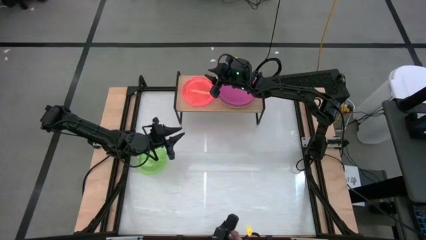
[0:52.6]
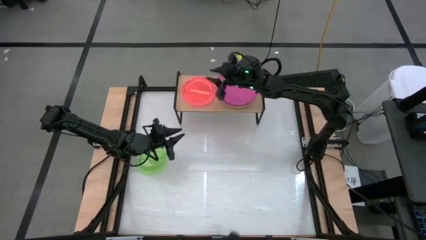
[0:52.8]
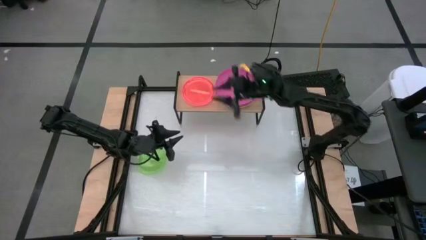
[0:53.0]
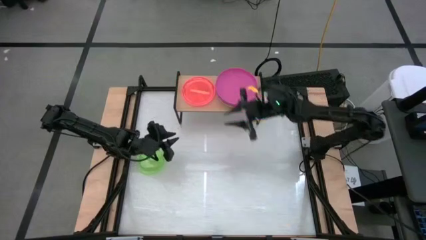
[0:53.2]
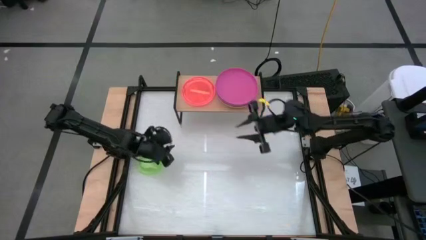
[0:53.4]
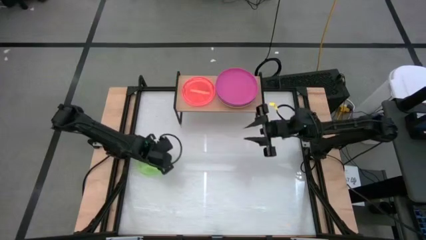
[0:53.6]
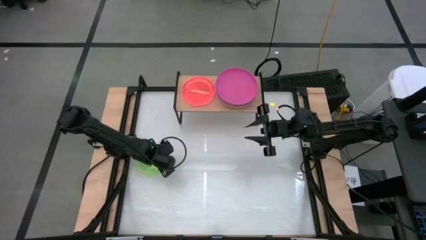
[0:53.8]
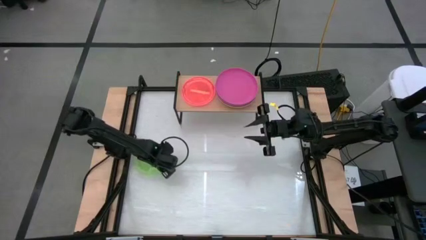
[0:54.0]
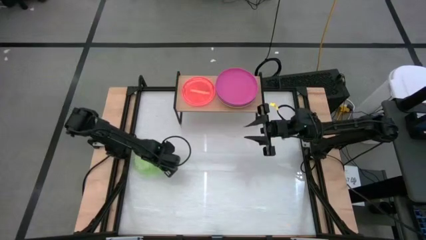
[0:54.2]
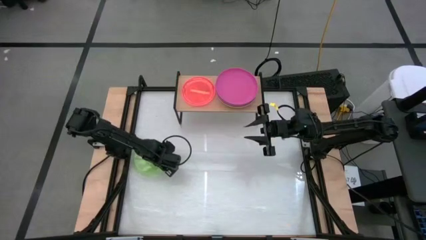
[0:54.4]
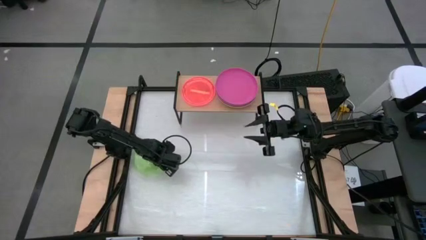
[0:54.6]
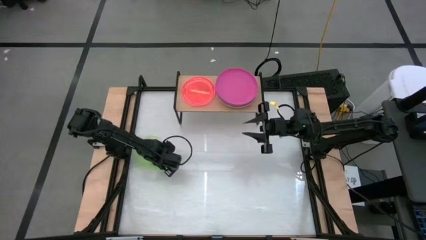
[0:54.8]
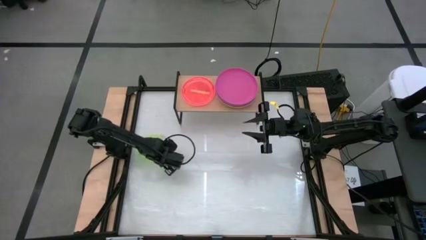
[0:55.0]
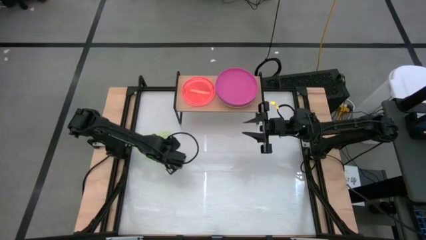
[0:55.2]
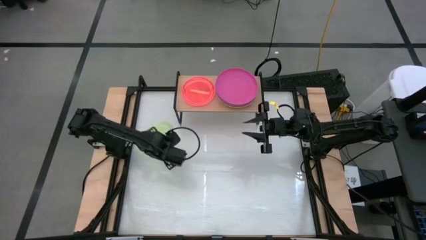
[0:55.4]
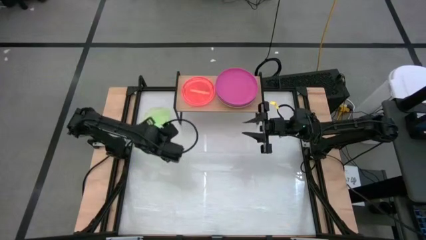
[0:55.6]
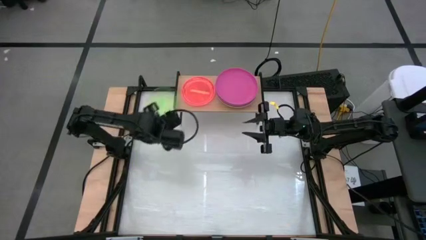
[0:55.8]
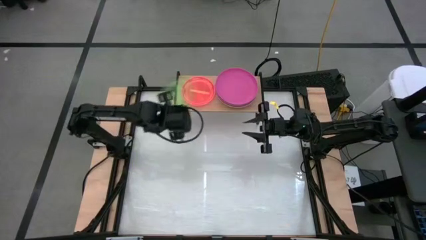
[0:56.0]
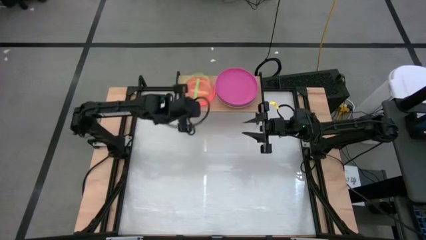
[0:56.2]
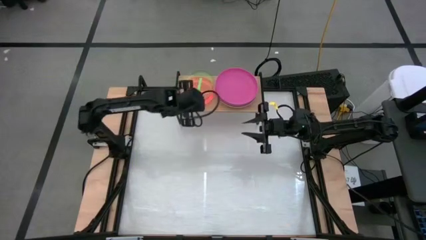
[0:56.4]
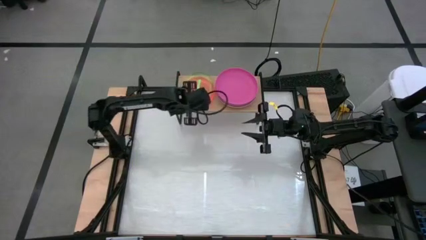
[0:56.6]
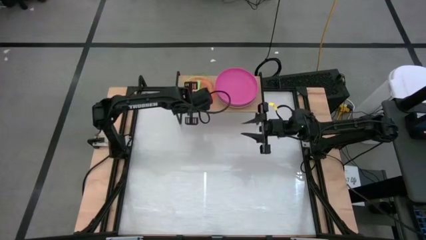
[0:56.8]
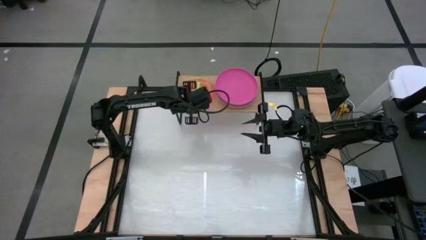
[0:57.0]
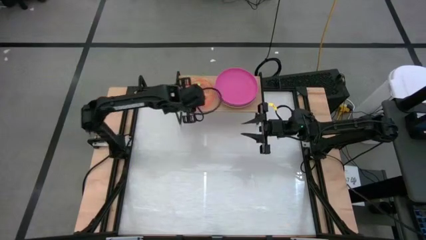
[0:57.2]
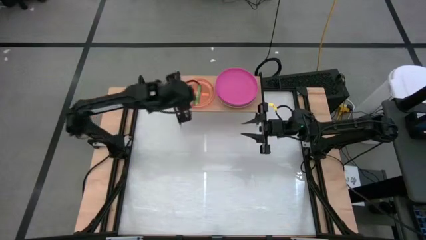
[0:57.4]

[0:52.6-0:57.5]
Task: Place and stack plates onto a shelf
Stack the green transparent plate on top of the orange transparent plate on the shelf

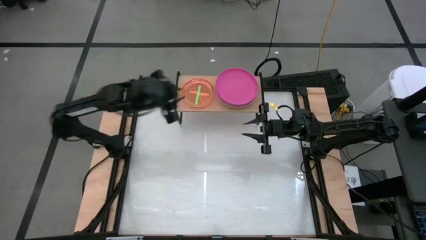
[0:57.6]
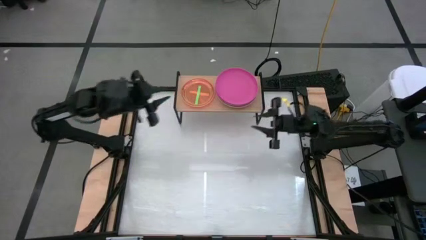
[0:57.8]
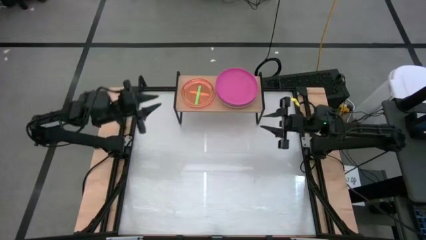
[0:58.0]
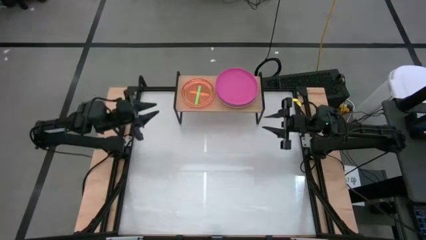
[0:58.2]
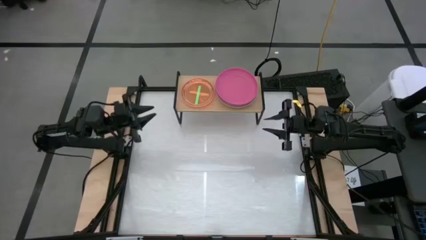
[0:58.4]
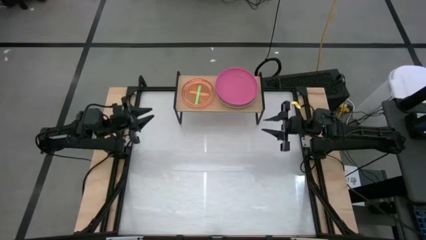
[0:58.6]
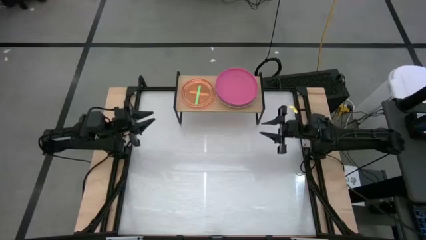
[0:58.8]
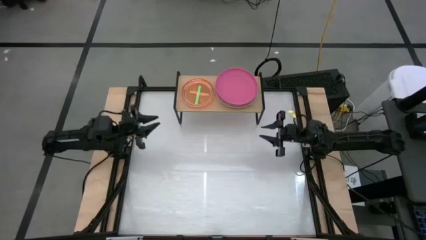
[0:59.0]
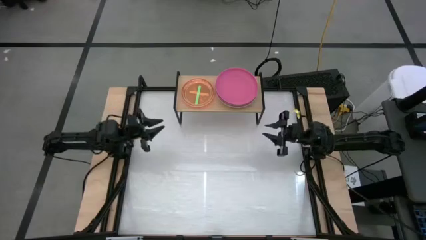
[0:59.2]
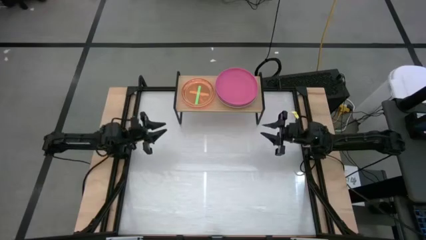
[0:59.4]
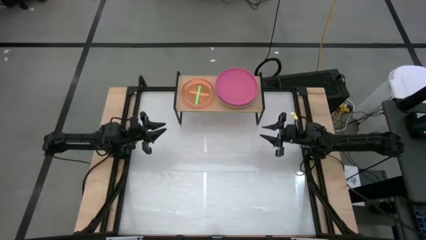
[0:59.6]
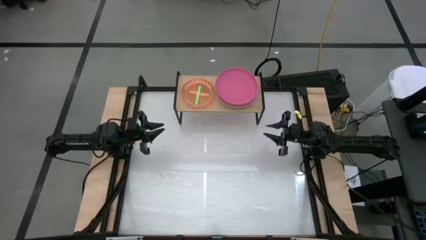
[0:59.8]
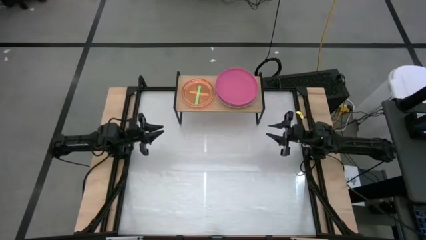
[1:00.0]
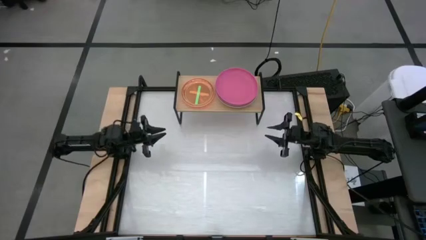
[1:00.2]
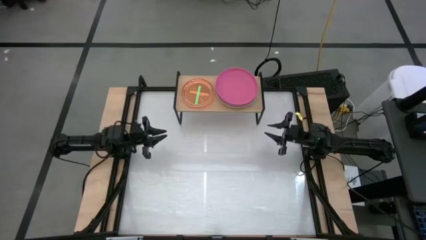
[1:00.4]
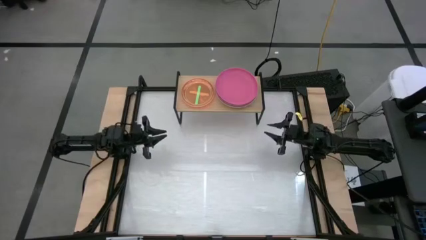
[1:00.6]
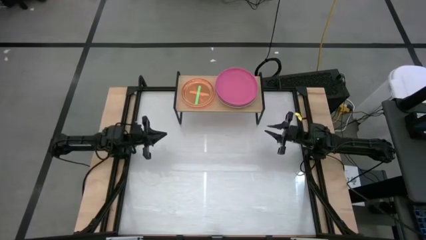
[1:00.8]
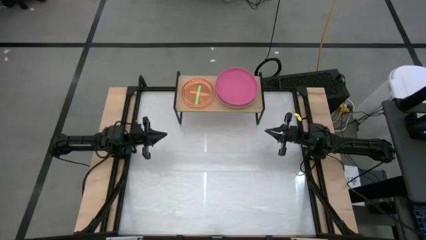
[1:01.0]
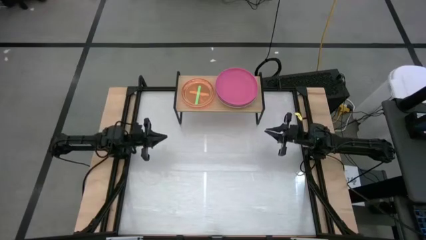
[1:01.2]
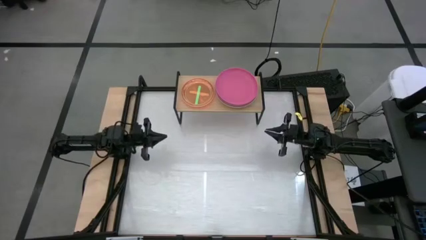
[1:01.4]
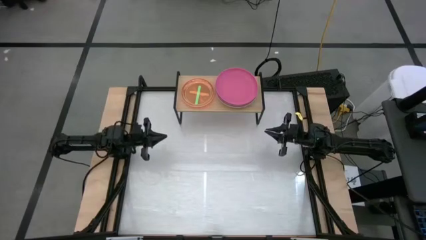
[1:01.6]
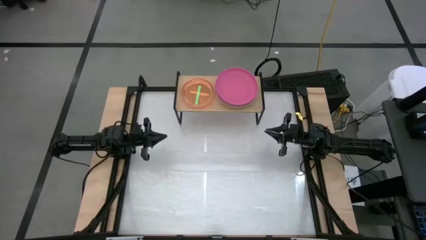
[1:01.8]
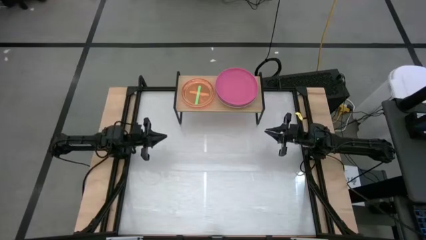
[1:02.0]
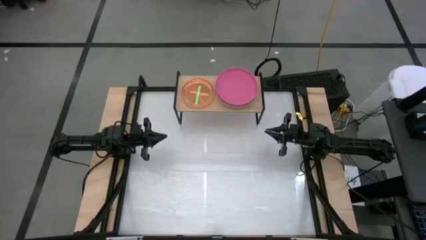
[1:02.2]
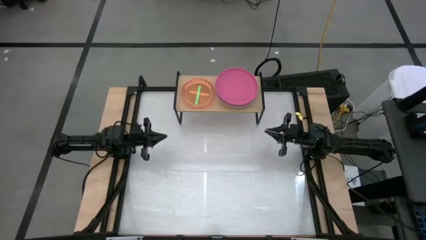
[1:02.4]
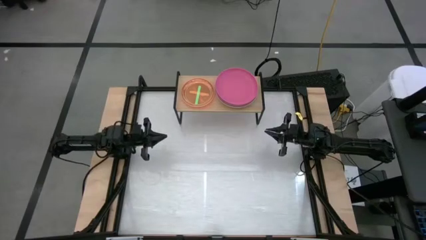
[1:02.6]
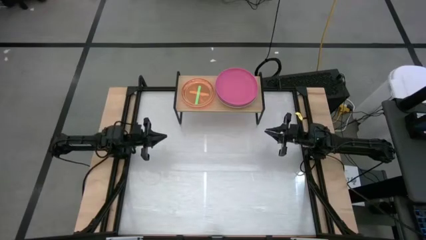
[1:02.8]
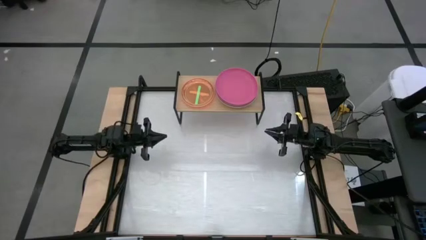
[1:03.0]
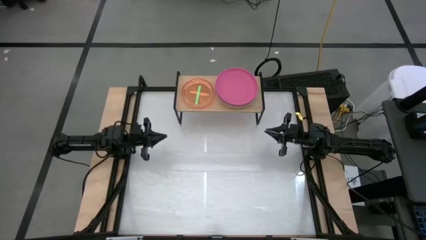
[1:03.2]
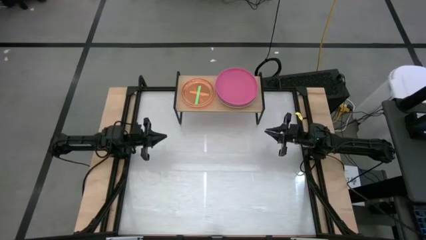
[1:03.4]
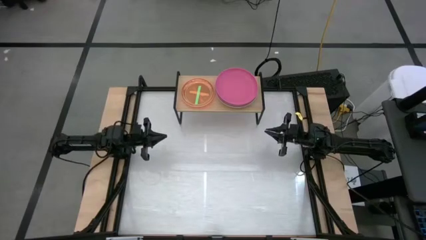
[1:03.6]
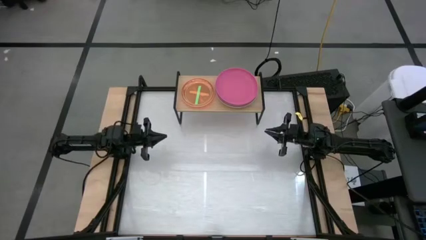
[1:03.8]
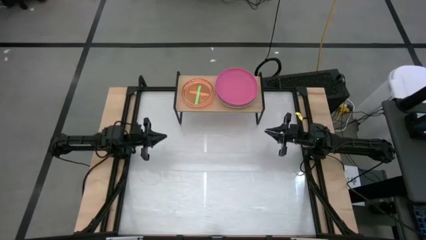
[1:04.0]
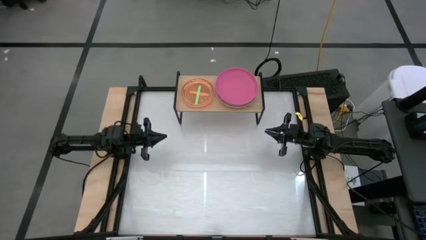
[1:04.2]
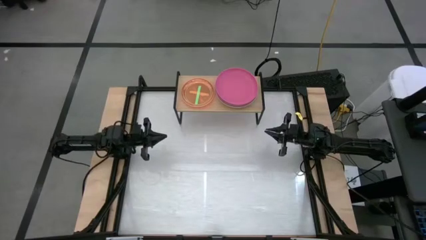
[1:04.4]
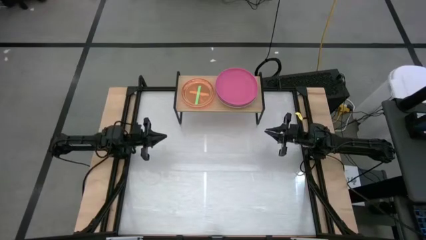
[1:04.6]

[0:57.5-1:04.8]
Return to Home Position

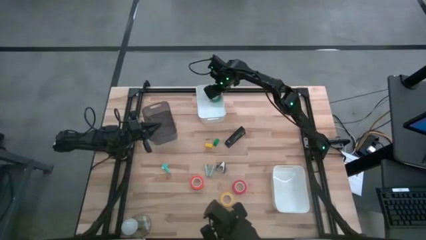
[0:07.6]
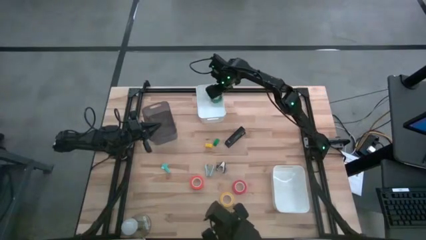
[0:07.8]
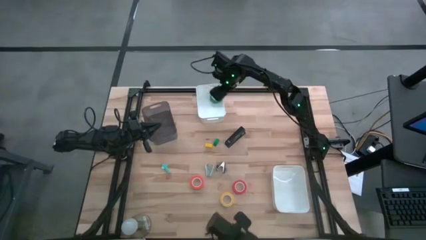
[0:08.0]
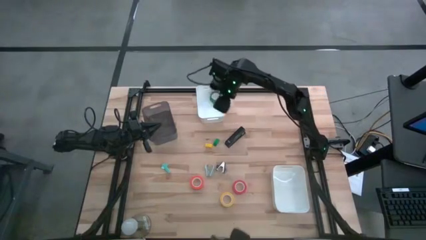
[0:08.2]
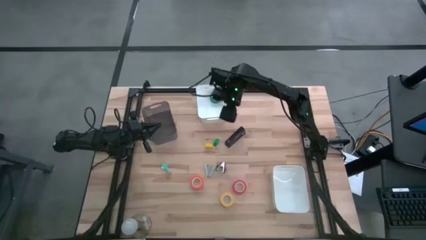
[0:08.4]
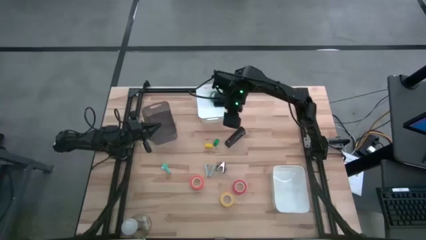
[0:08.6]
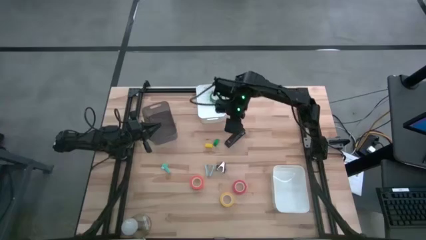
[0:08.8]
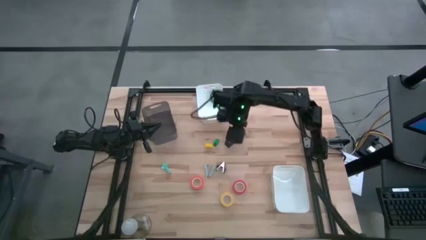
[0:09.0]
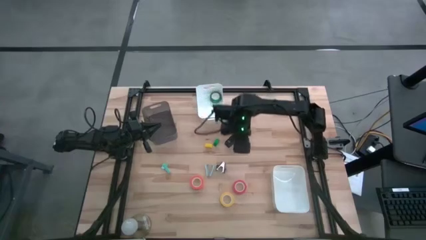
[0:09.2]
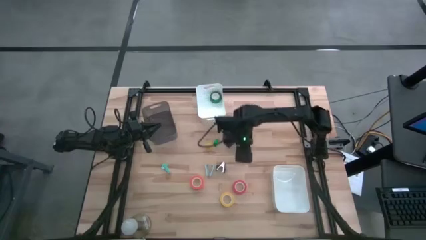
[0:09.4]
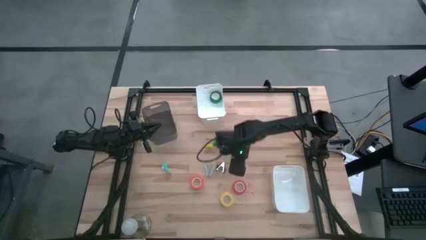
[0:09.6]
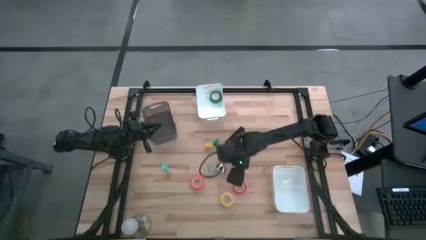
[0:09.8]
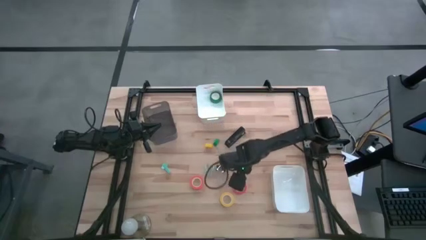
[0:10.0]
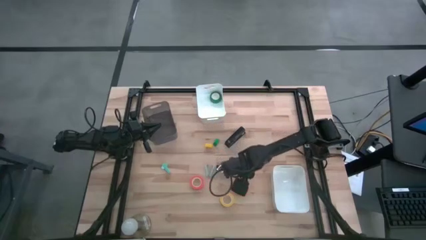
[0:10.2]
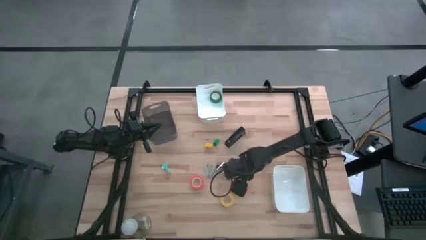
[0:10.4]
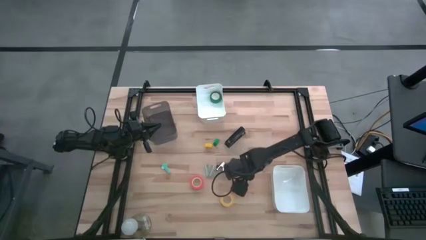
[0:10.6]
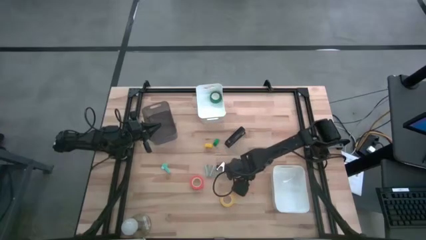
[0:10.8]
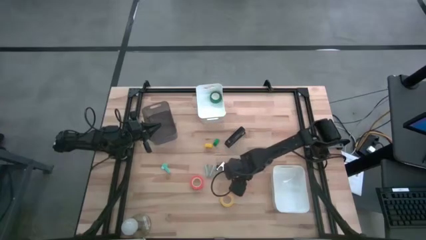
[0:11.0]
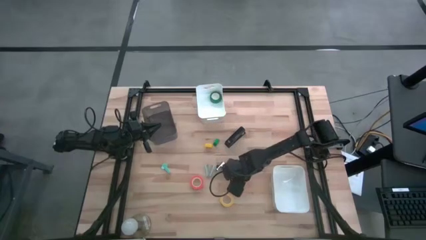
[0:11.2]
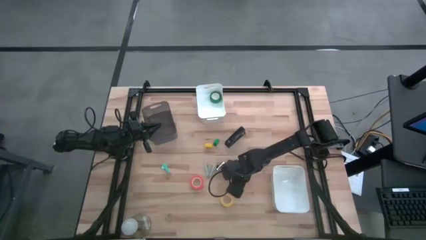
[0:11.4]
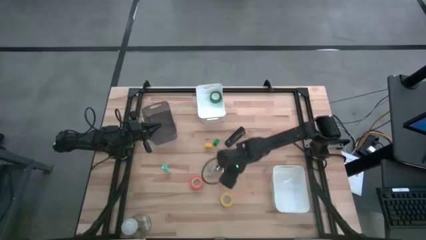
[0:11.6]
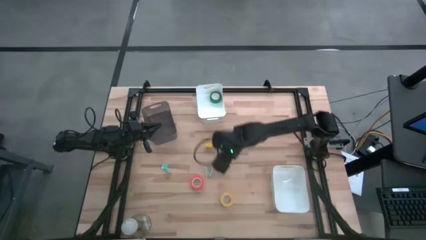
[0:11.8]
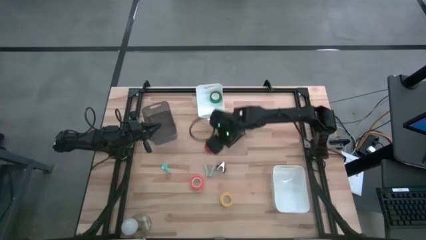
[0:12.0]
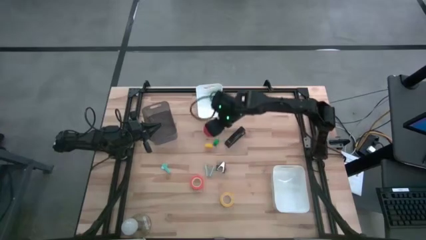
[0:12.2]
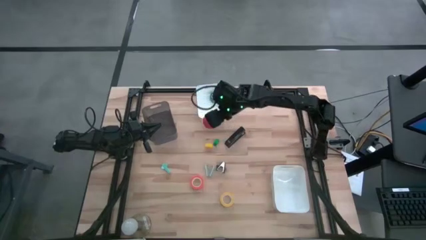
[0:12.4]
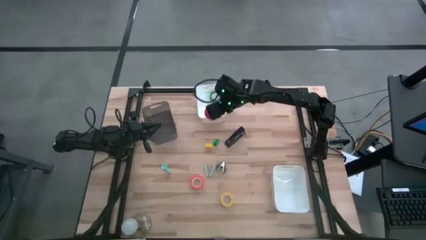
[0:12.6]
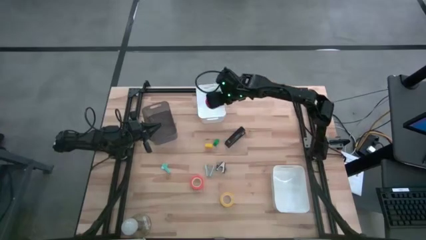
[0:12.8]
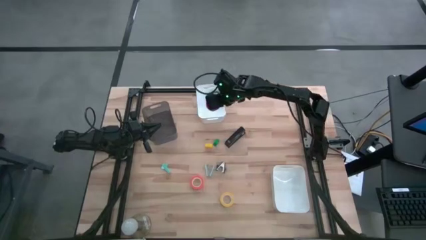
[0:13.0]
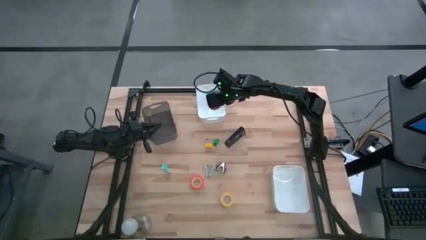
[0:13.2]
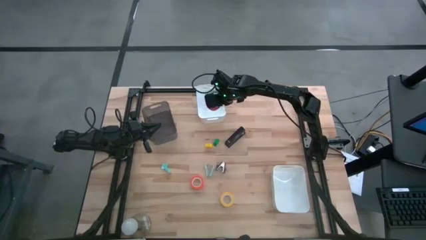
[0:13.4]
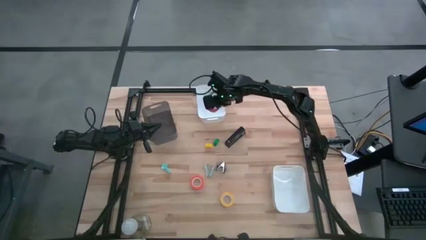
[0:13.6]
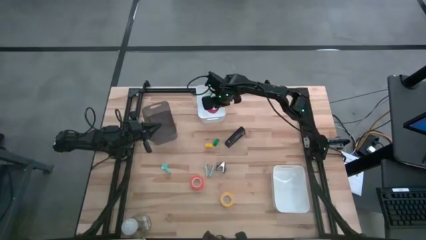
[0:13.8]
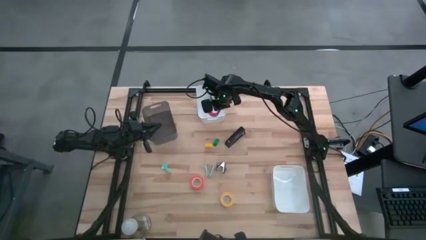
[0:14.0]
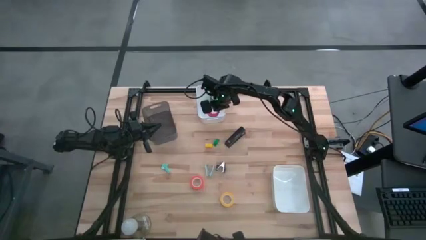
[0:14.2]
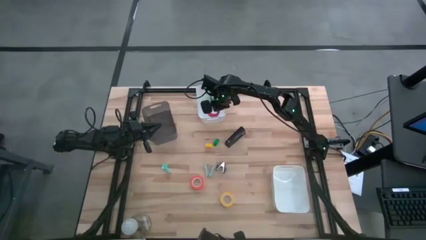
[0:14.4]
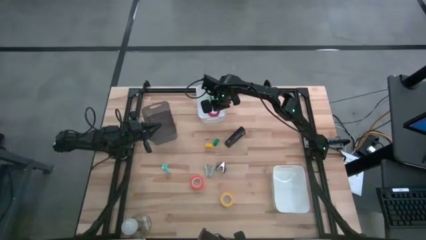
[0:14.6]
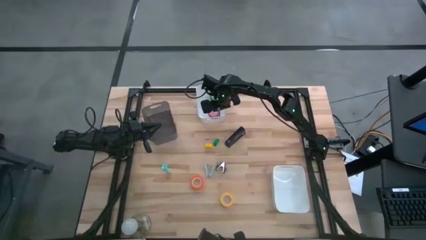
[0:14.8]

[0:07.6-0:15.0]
Task: Pick and place Stapler, Stapler remover, tape
Put the red tape into the top white bin
